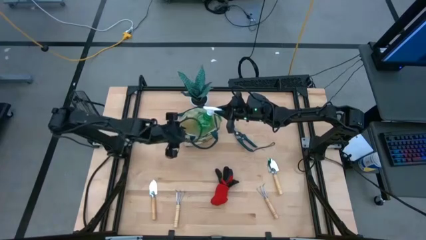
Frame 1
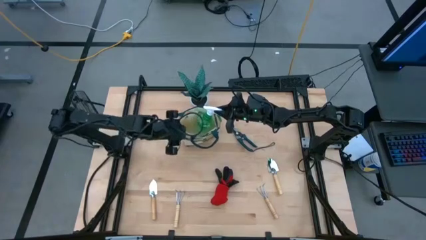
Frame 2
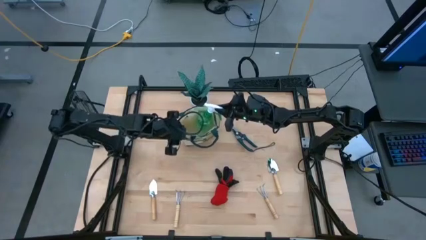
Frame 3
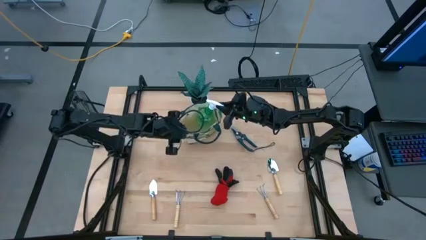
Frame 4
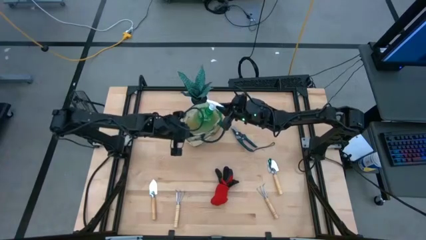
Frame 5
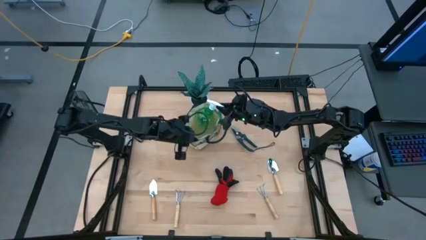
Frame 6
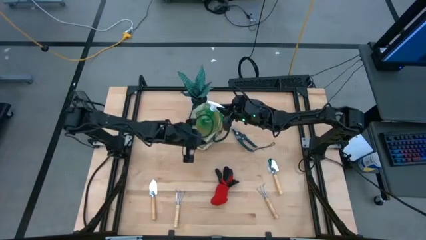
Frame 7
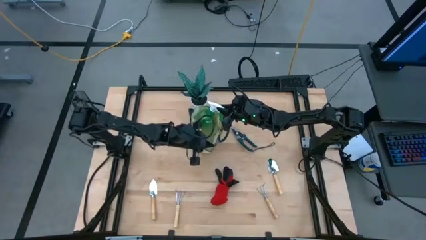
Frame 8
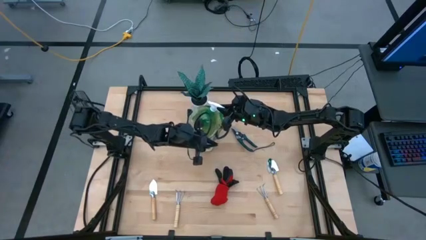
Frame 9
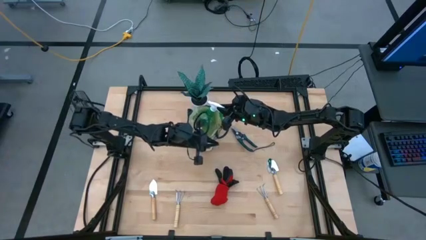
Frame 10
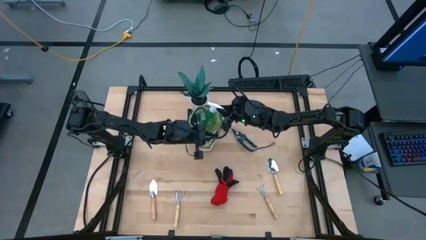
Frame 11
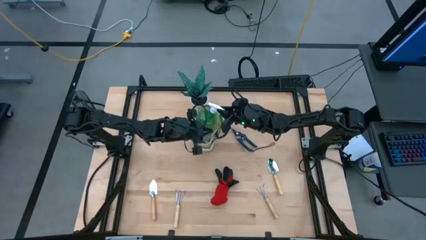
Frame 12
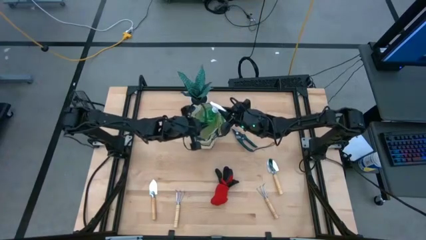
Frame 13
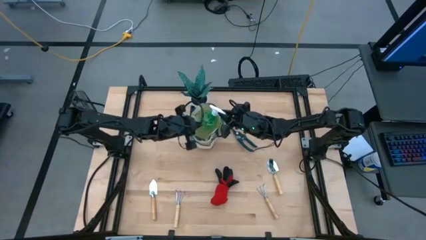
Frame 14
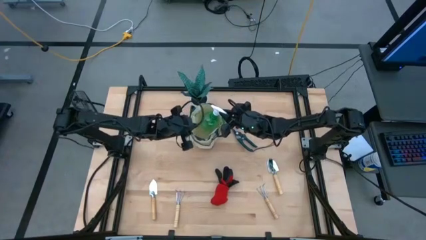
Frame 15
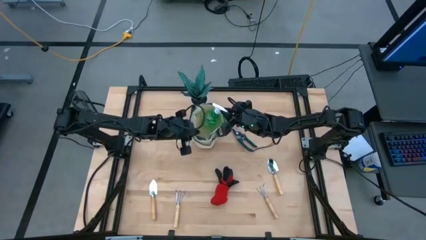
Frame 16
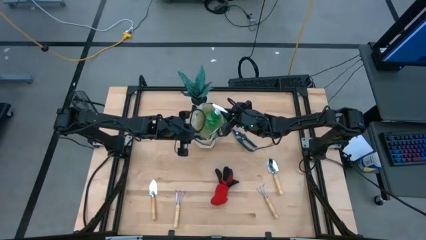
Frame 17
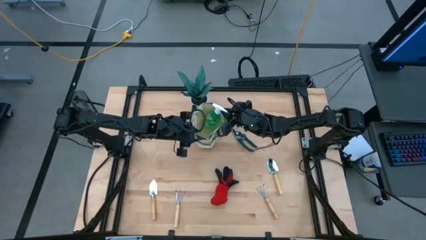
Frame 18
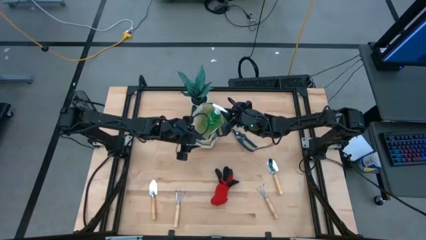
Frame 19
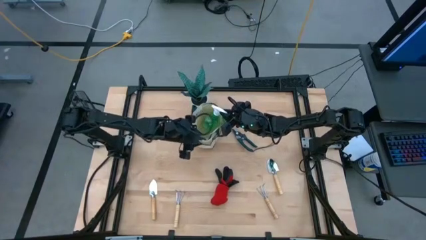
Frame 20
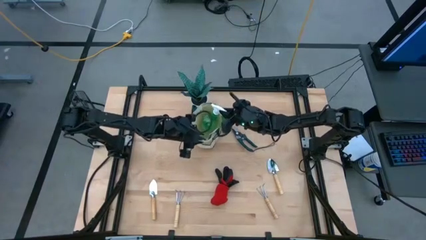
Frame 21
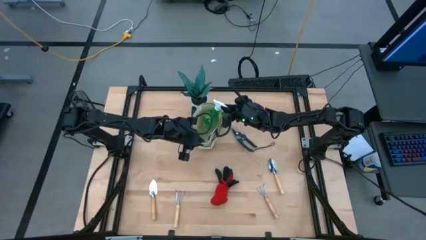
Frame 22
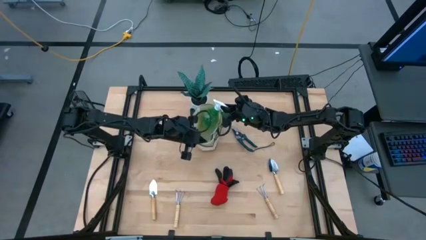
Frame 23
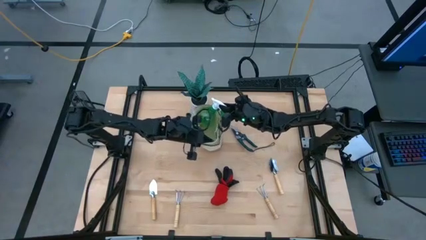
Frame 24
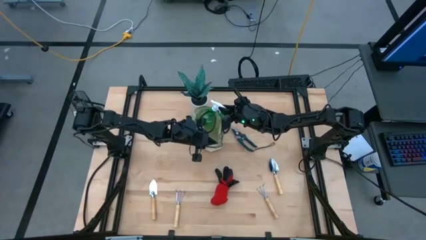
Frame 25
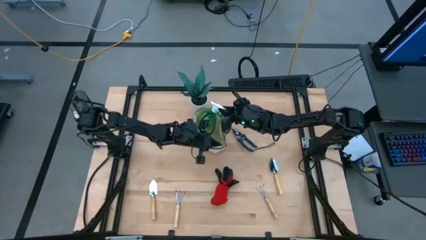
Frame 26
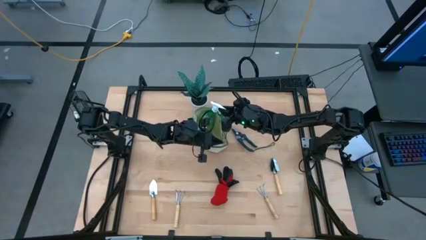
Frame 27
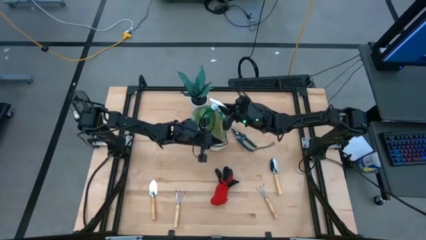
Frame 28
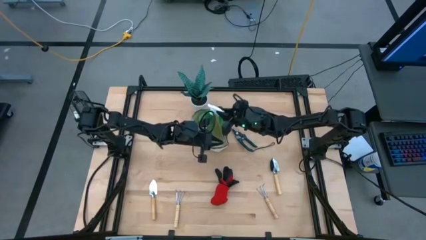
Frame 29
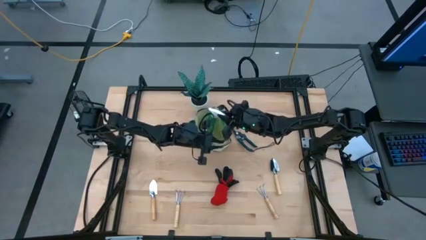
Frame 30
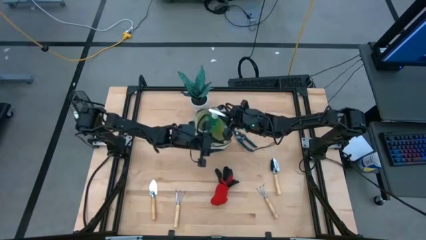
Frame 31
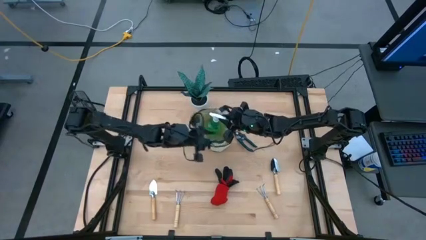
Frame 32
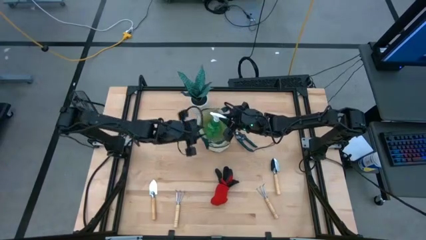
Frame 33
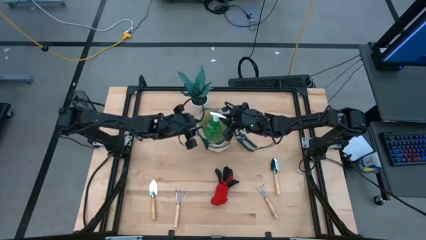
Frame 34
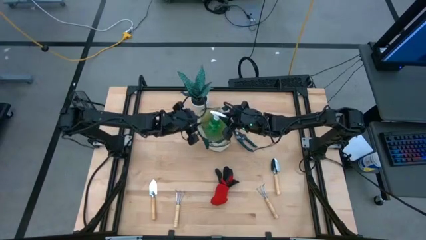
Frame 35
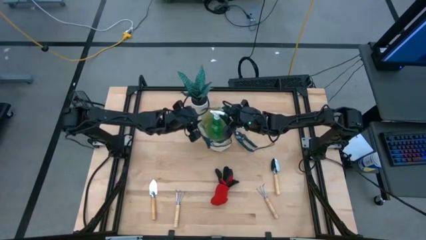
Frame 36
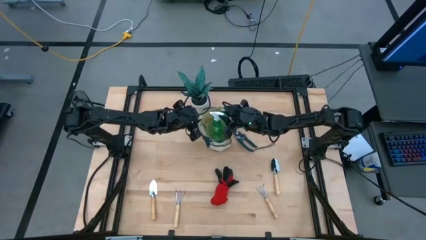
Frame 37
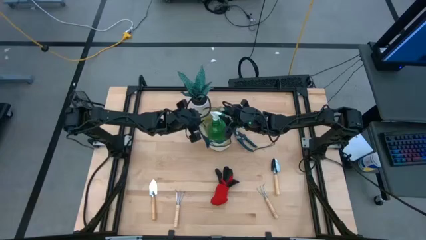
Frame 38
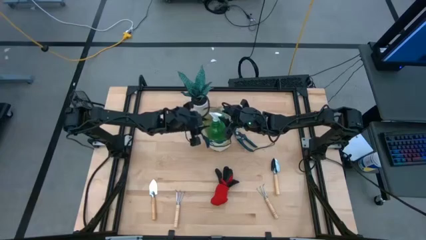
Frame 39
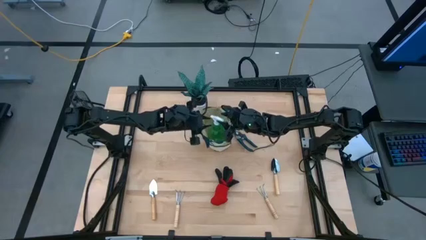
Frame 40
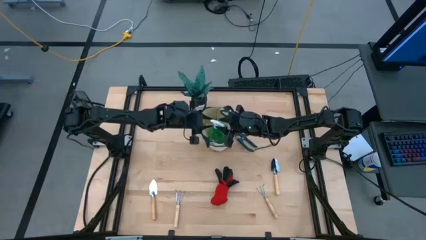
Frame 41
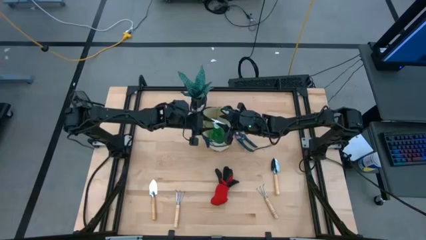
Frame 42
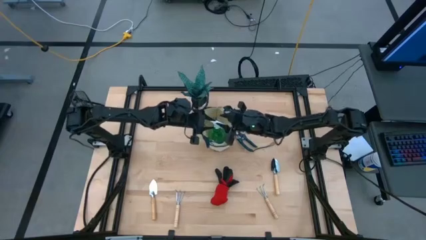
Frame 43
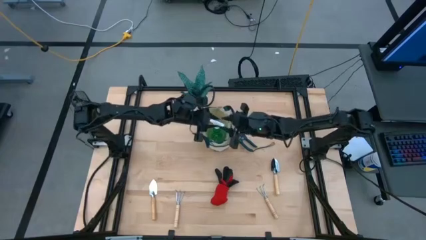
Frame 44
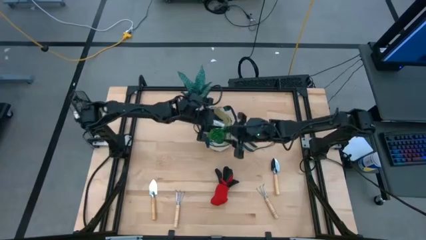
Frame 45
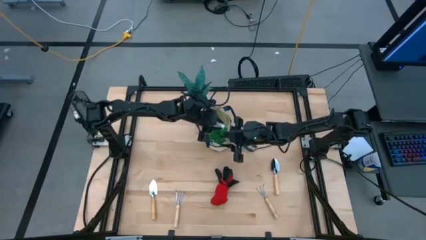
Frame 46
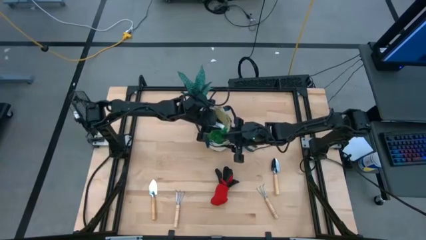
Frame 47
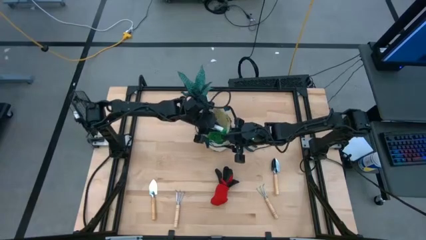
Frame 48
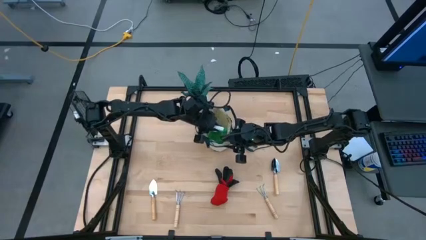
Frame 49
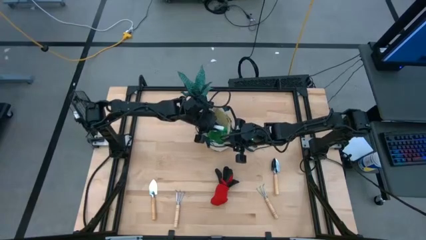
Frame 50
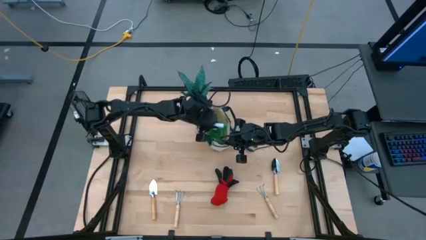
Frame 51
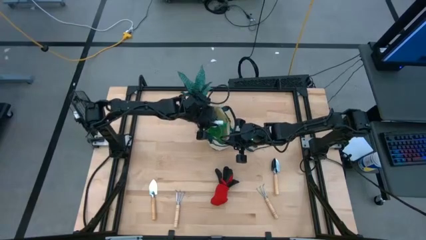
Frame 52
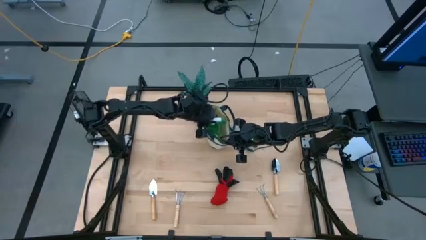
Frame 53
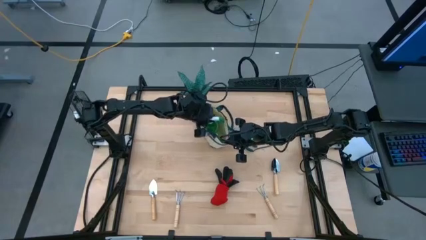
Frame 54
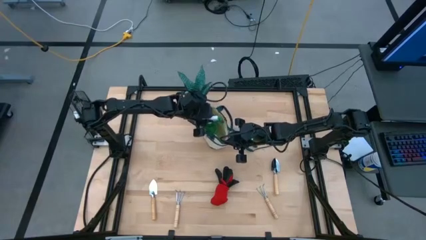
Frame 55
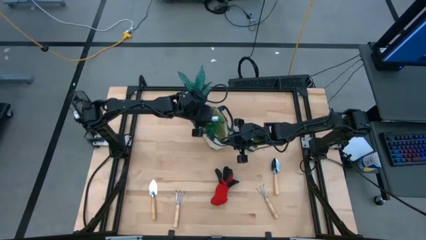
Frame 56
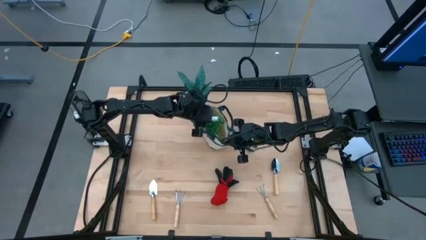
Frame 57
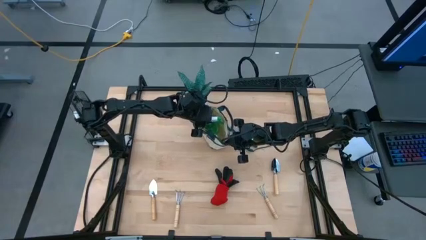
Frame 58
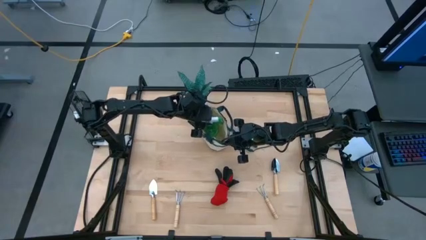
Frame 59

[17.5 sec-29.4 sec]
Task: Pick & Place Garden tools in Gardening bag
Put the green spray bottle into the gardening bag
